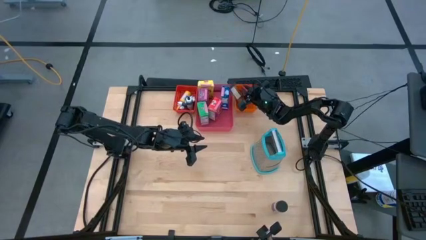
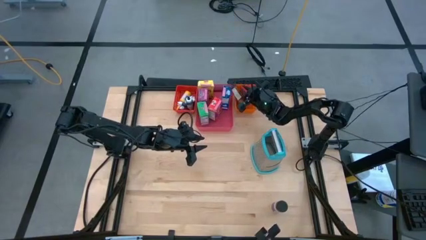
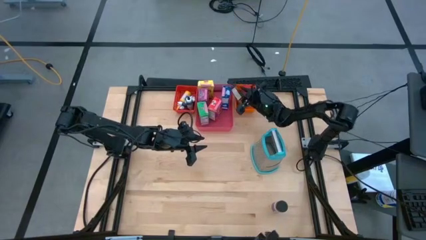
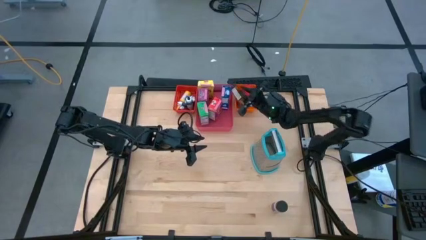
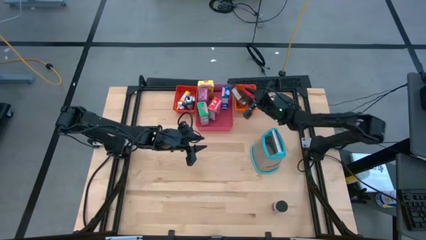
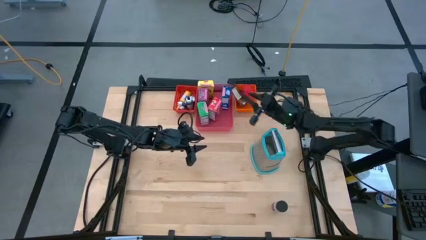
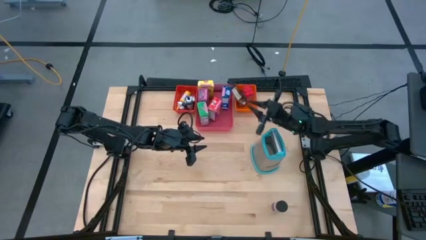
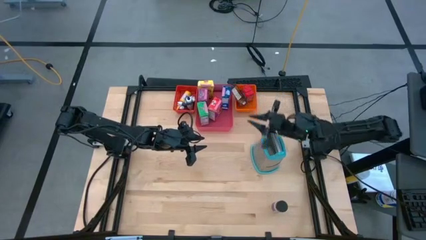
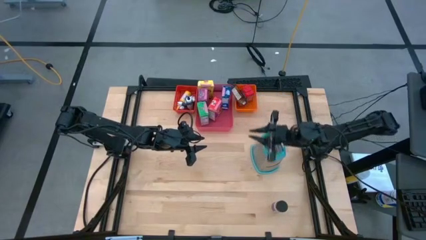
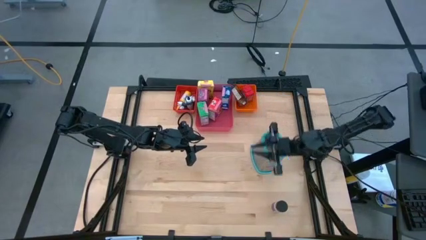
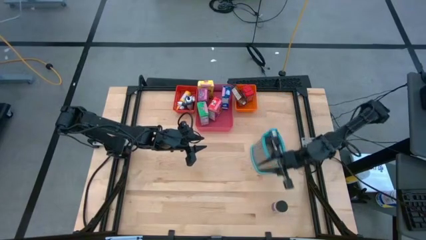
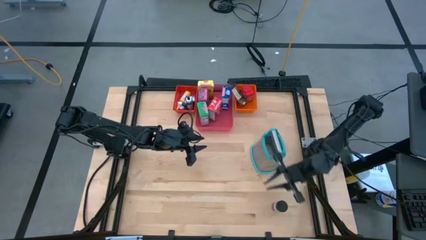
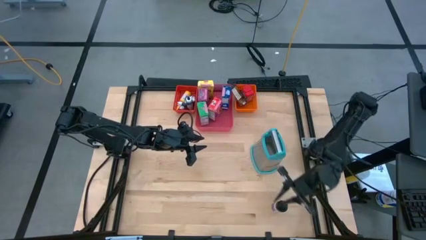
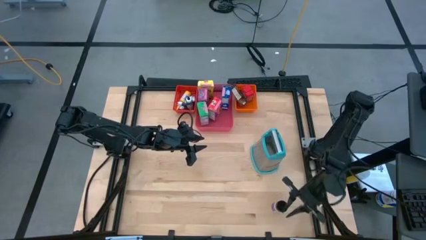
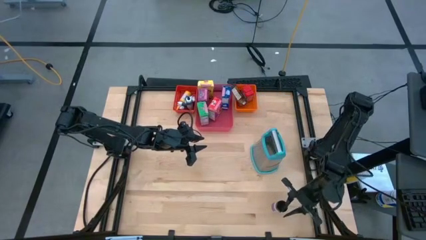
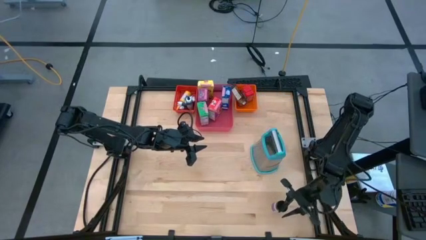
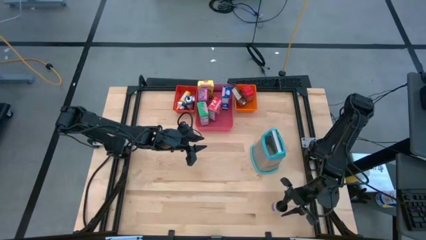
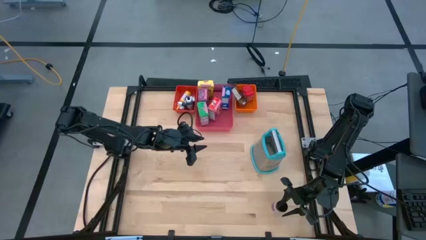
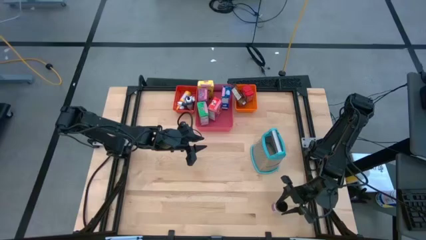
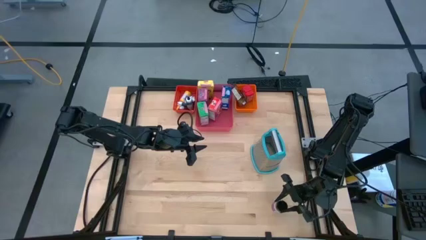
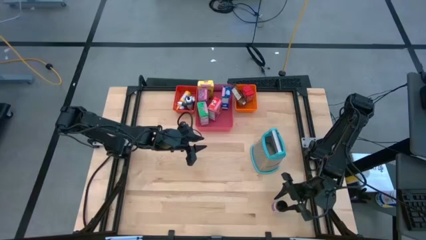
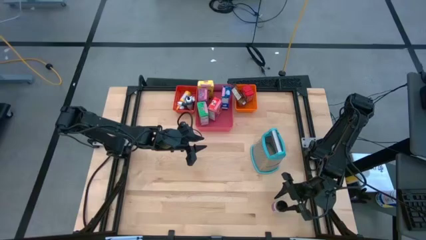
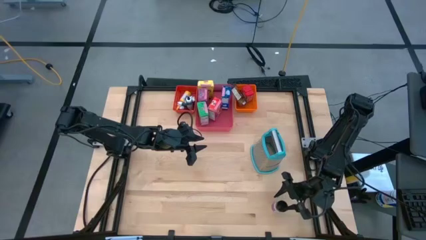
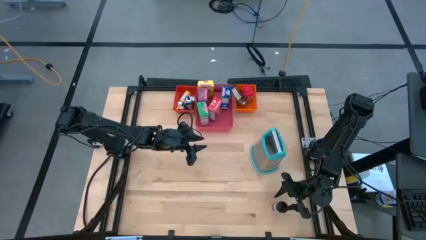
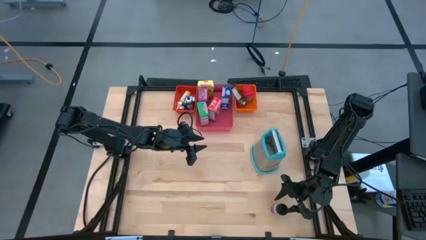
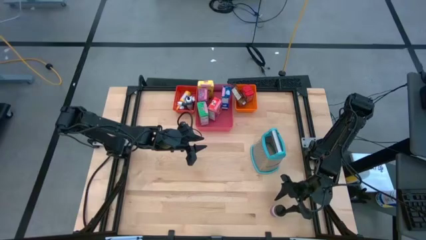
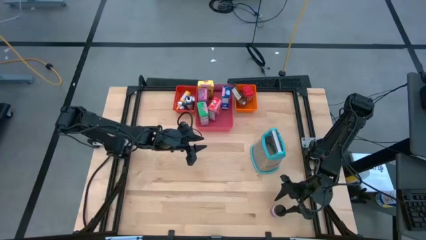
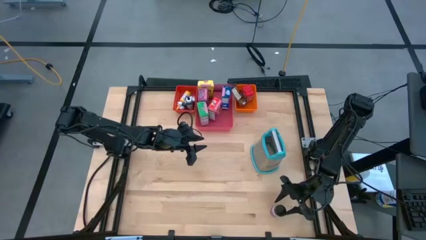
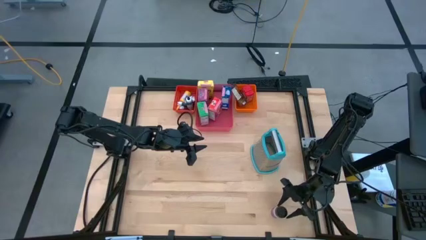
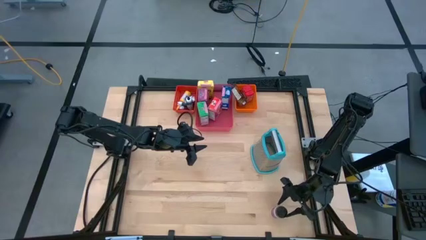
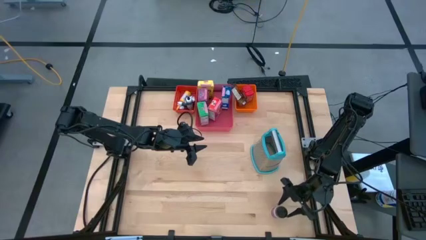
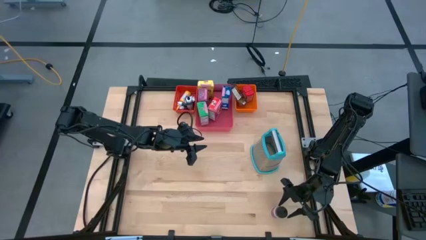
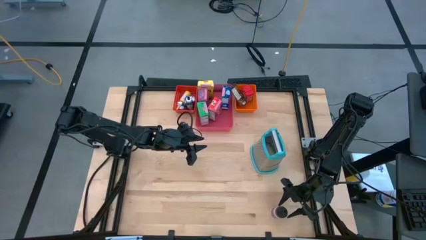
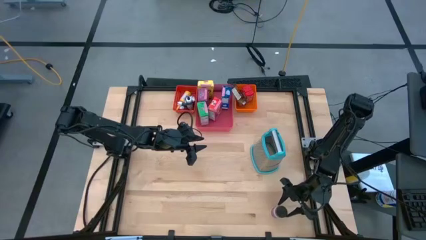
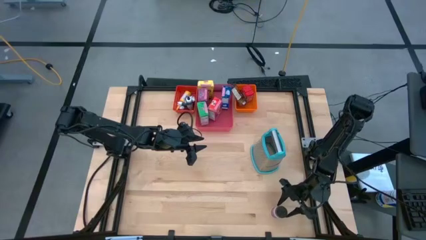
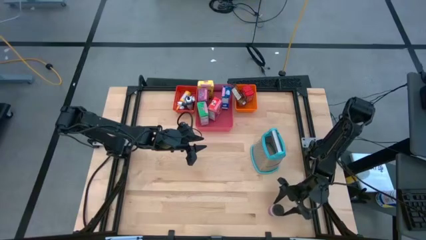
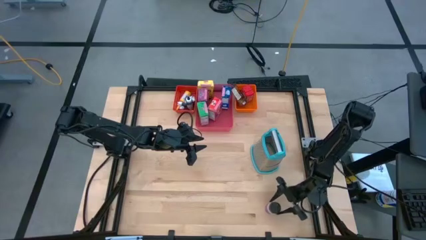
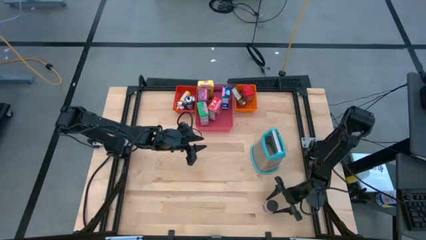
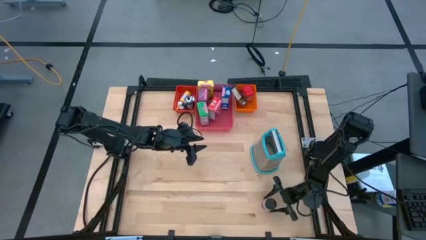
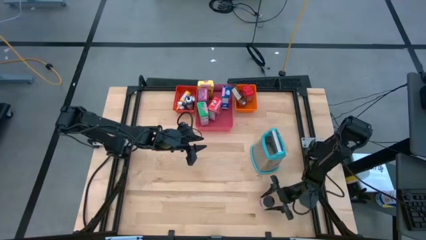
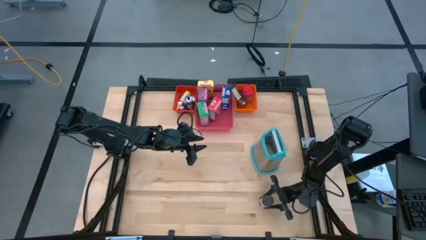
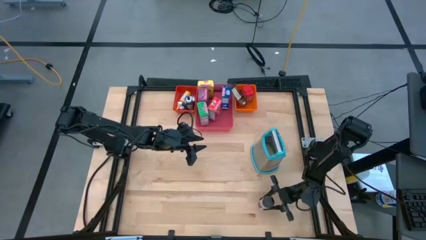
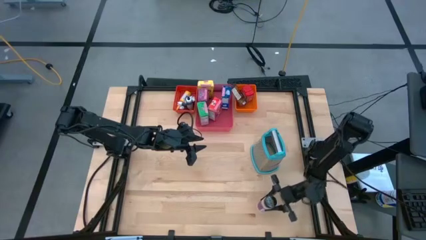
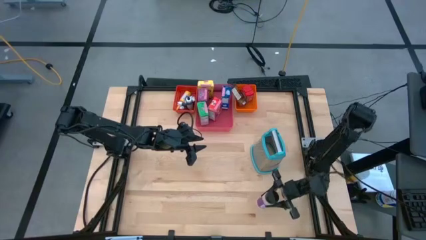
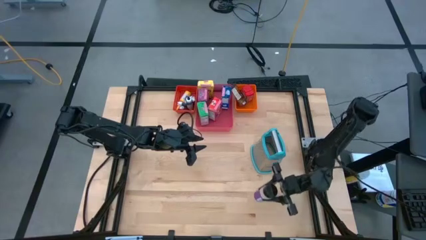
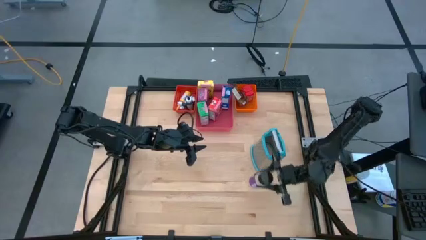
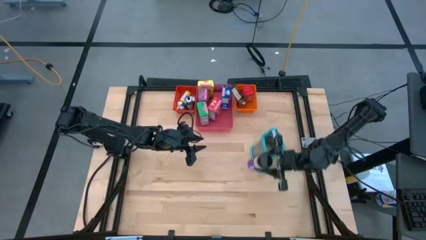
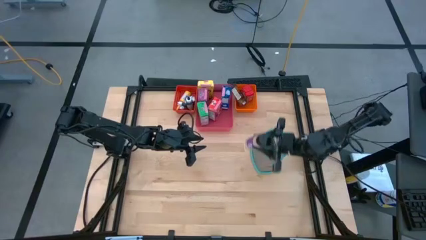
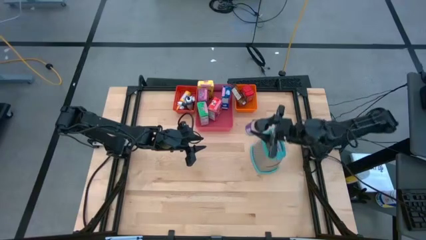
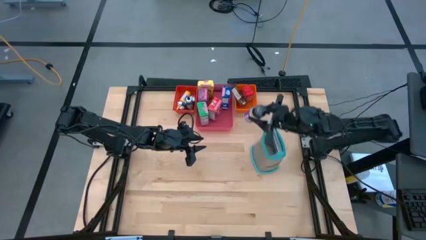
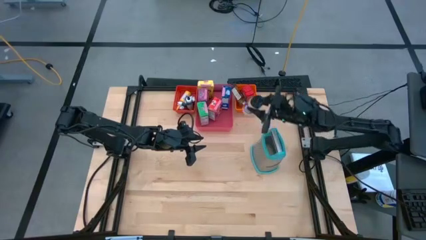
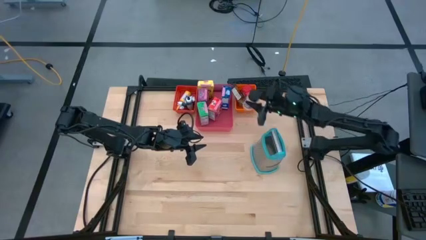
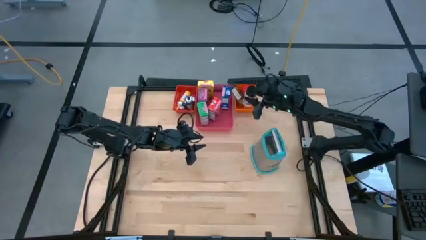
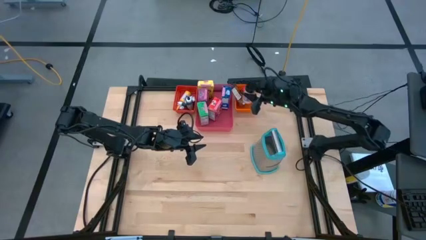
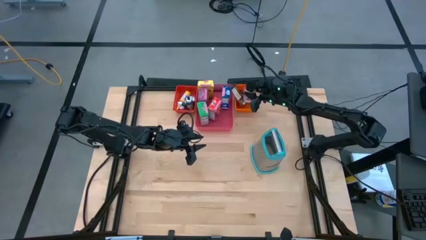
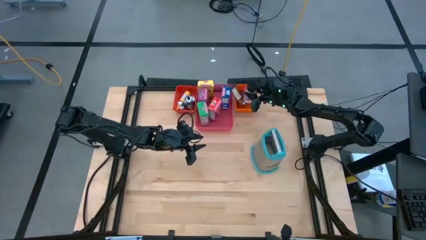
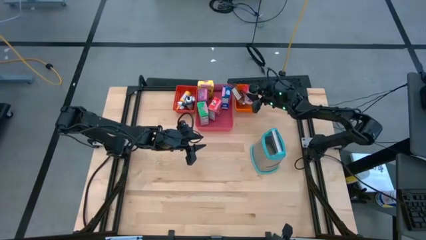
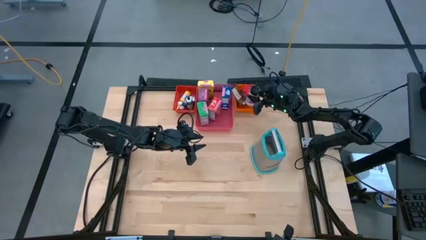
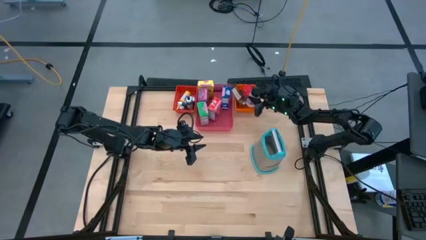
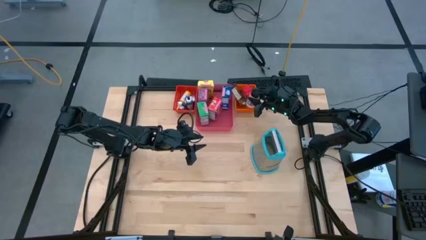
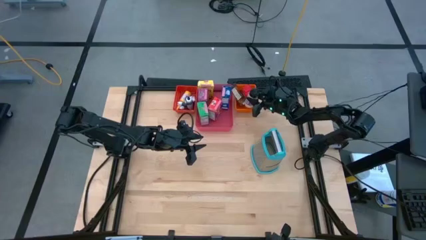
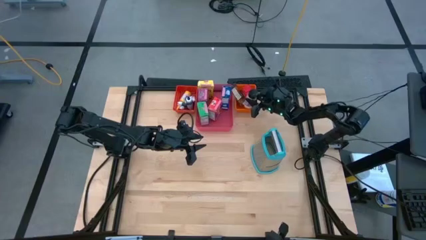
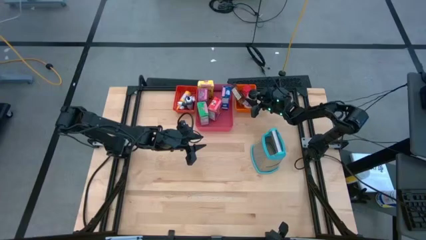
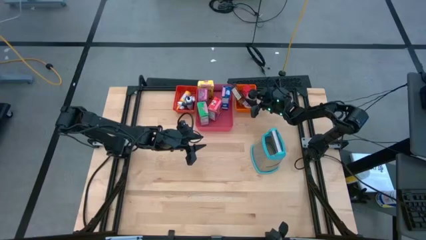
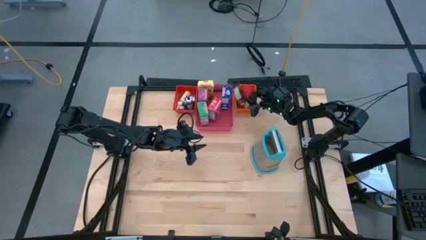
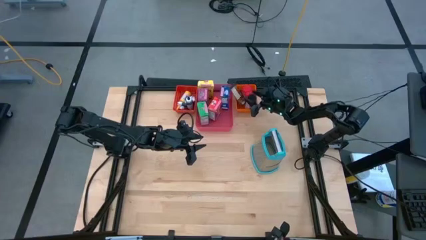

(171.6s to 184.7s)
Task: Pick & Place Kitchen Items
Put the violet seasoning bottle into the orange bin
